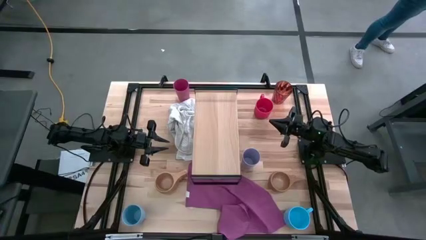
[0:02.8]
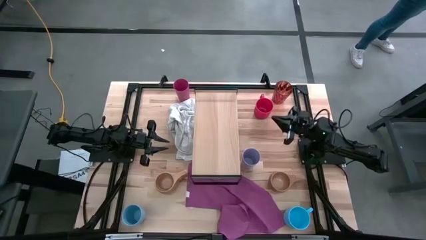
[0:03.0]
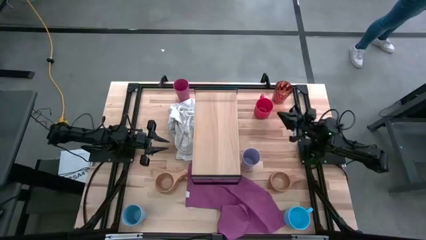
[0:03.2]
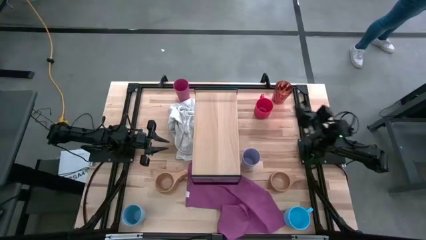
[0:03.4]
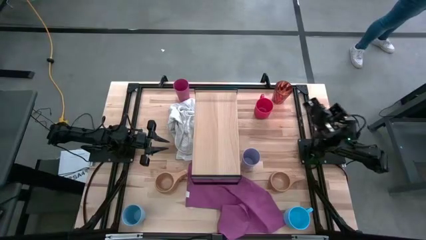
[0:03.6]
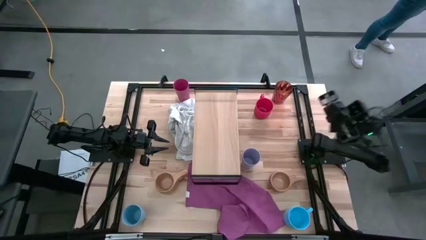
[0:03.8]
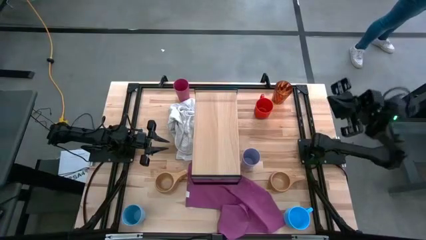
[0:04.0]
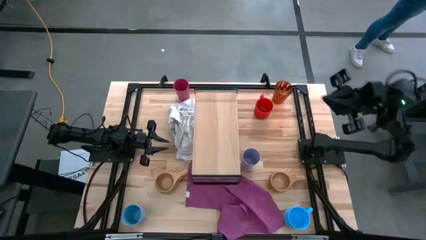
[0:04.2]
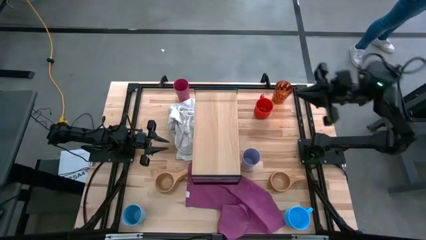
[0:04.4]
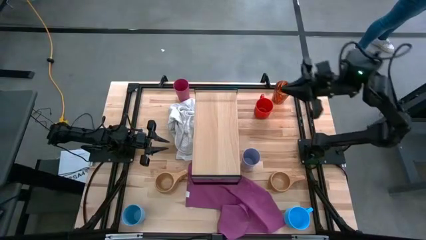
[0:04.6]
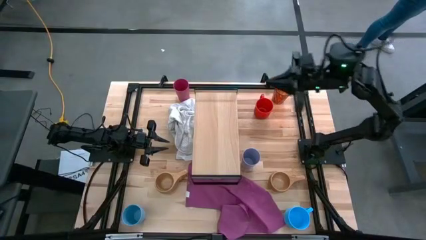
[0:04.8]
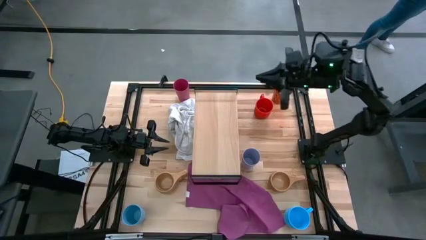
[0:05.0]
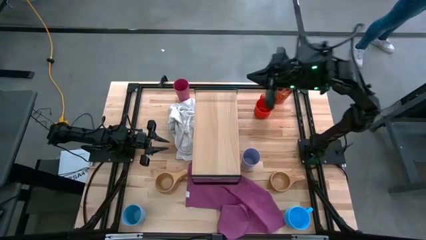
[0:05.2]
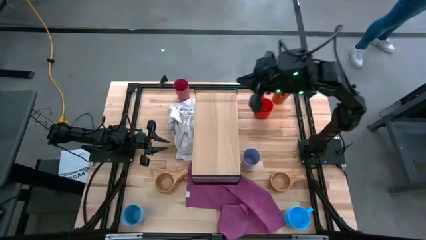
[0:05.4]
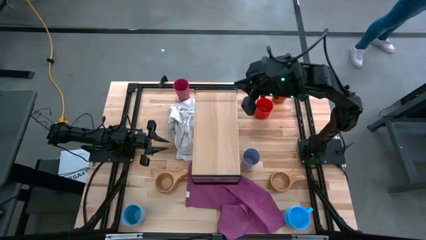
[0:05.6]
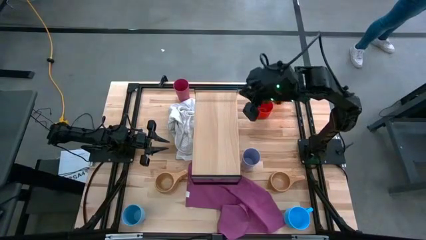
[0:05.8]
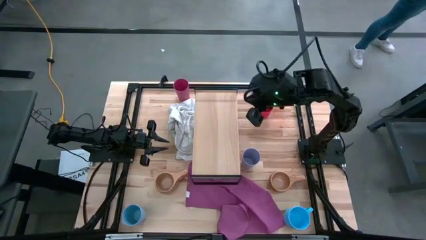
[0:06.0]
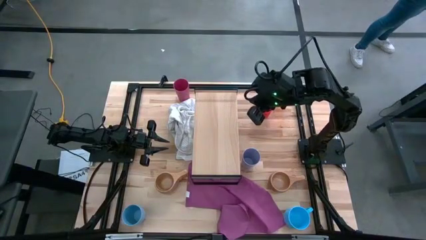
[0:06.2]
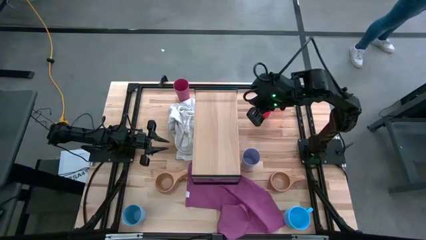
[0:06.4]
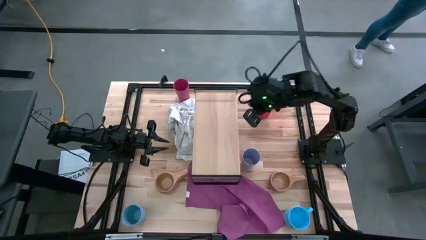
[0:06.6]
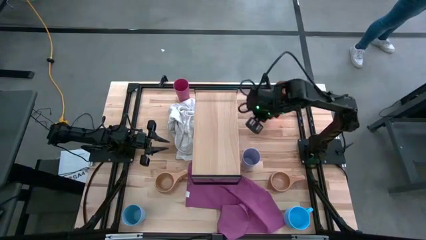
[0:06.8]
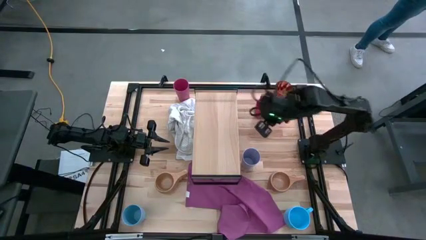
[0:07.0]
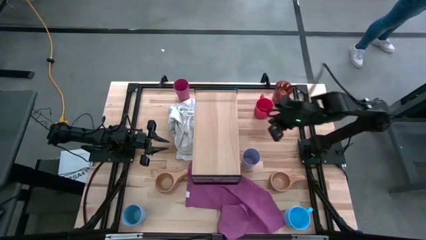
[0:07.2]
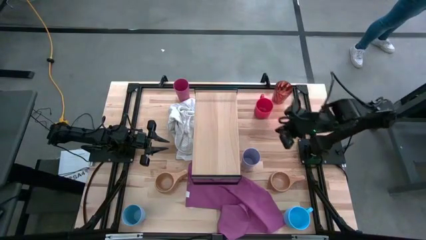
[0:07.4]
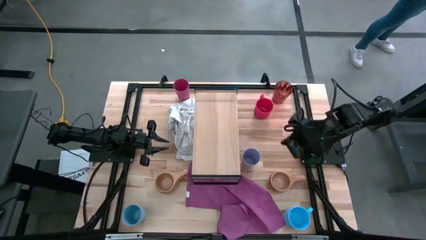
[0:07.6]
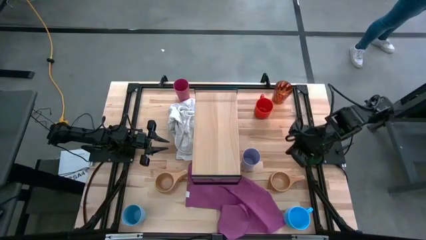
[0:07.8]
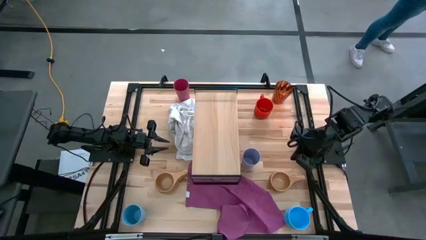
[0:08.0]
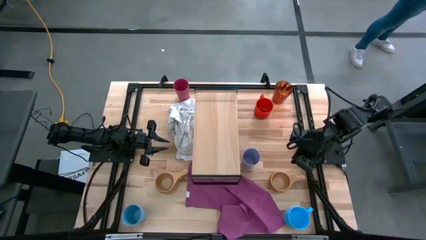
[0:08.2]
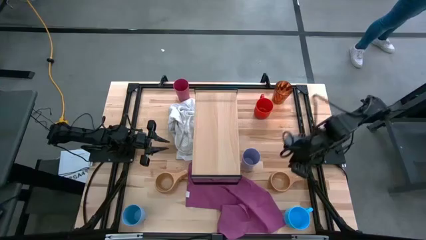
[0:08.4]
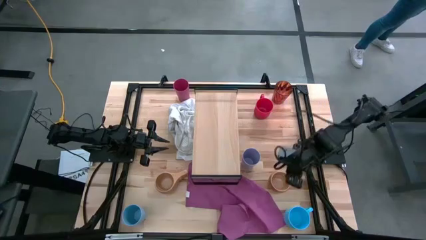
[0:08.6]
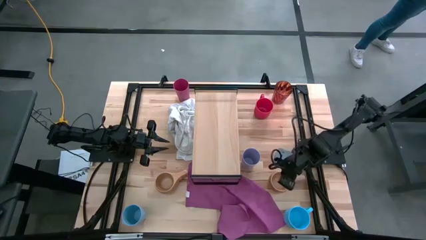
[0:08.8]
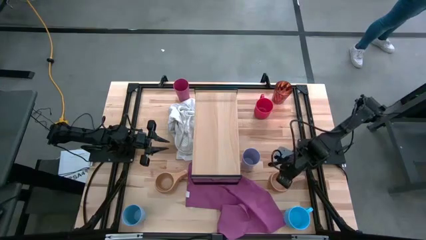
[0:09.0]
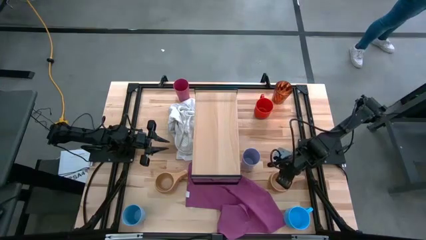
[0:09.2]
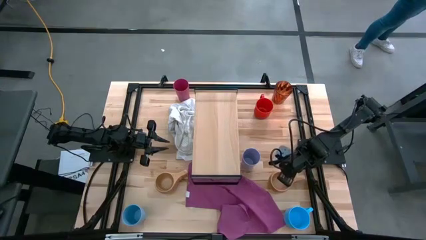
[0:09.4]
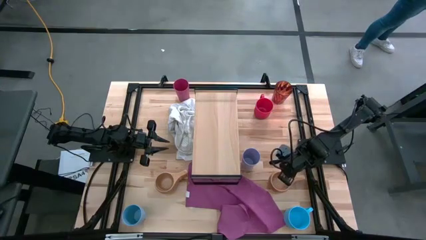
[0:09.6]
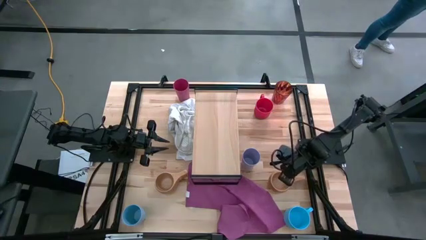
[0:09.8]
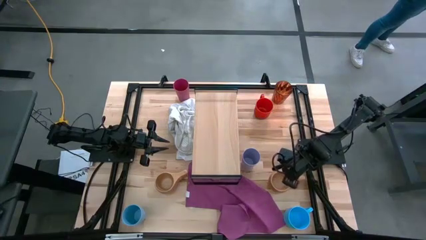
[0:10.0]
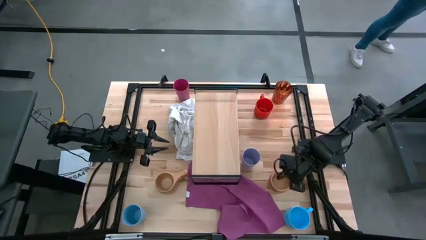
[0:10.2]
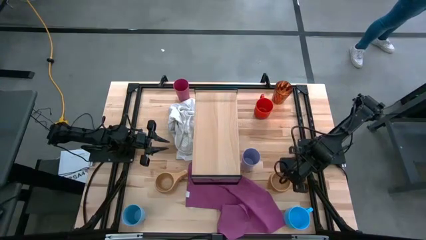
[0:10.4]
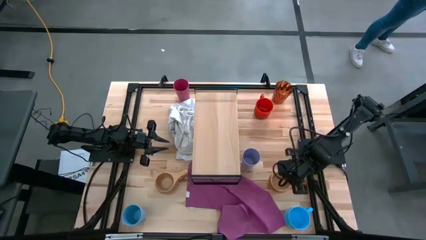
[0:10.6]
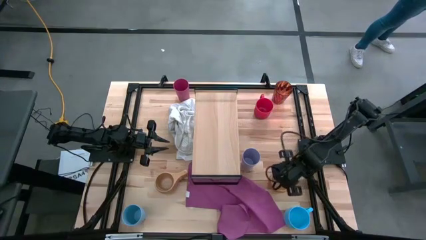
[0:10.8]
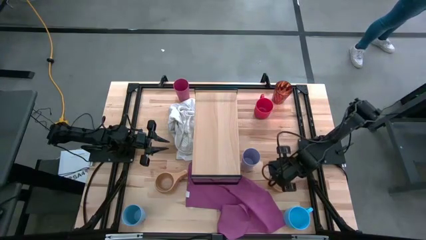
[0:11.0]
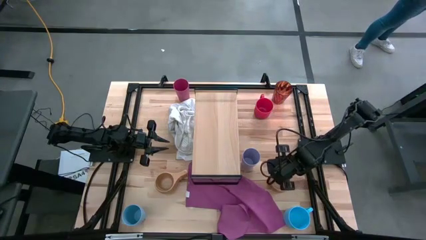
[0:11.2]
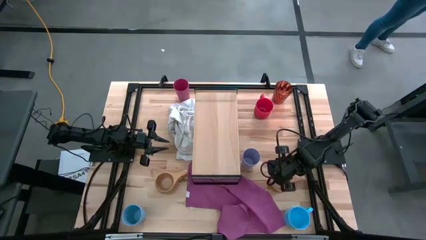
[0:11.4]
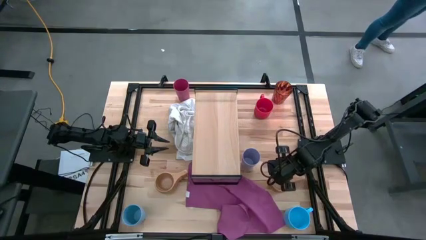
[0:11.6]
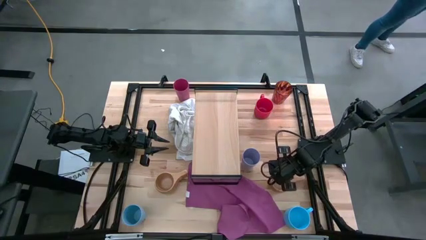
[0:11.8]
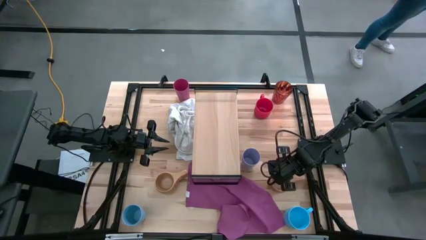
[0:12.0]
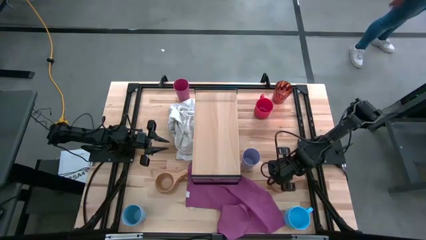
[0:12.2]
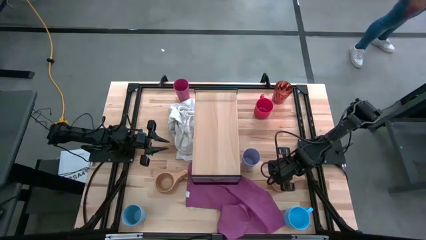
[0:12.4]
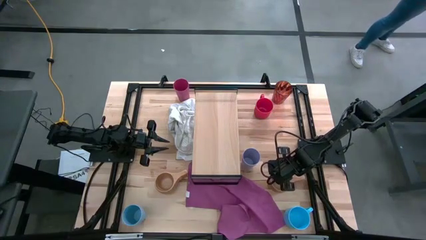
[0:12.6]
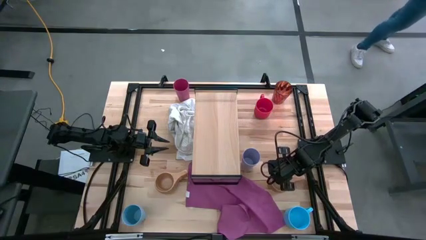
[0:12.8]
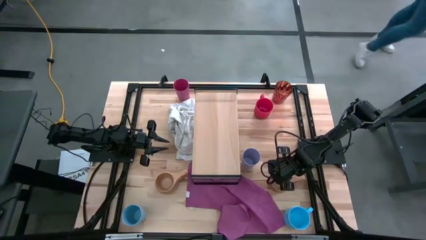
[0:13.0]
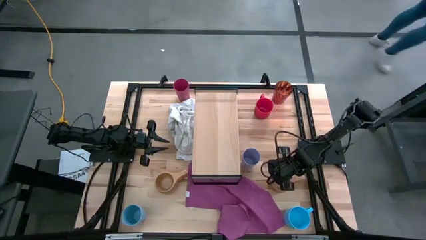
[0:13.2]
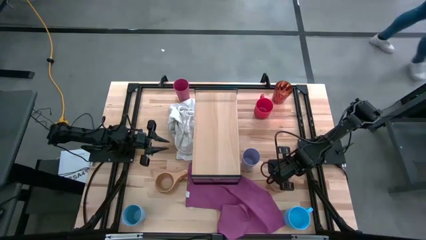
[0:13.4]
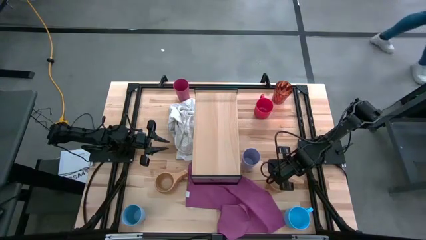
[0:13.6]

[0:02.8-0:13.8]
Task: Stack small to large cups/mugs on shelf
Put the right brown mug on the shelf
